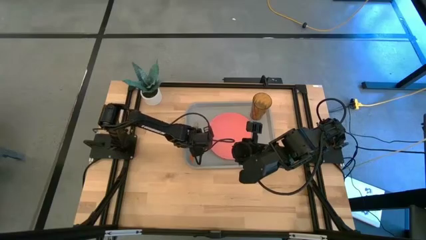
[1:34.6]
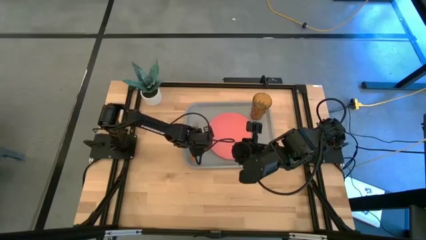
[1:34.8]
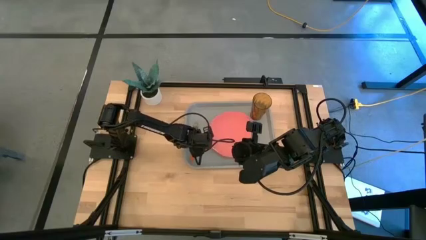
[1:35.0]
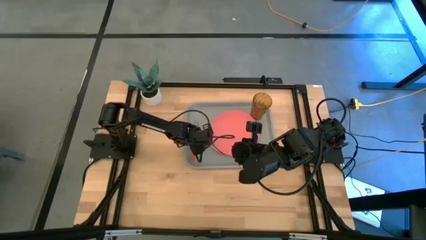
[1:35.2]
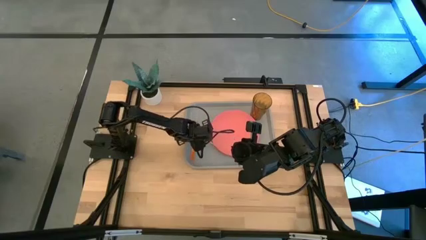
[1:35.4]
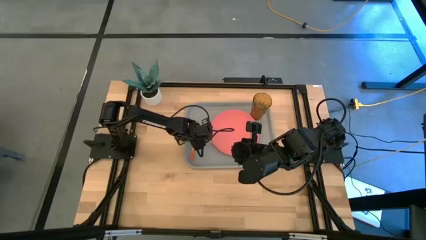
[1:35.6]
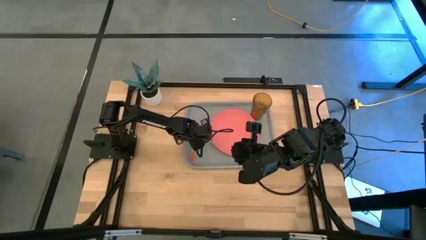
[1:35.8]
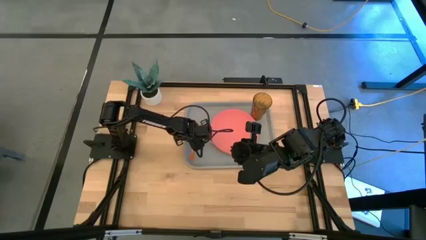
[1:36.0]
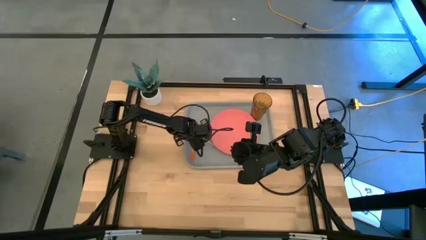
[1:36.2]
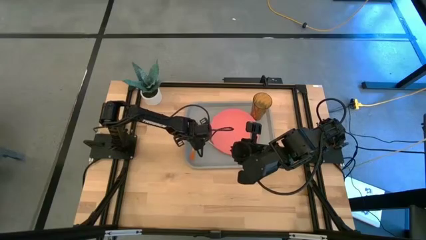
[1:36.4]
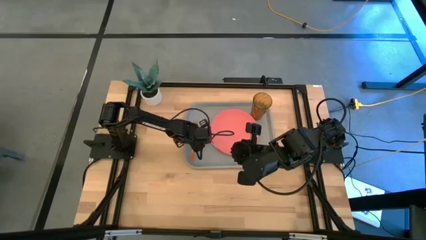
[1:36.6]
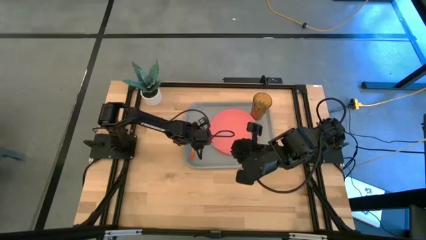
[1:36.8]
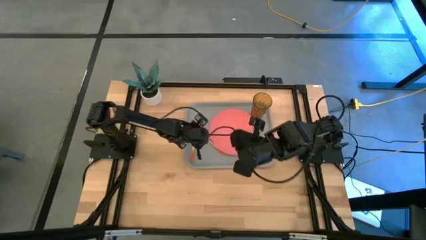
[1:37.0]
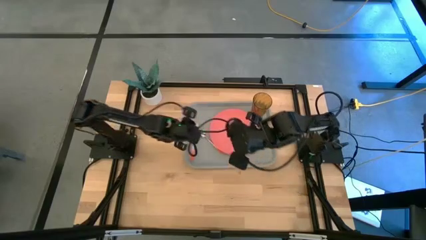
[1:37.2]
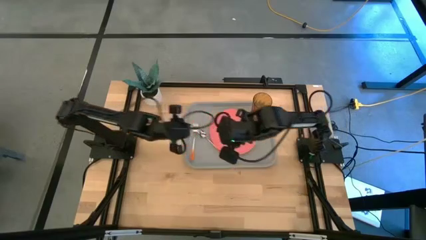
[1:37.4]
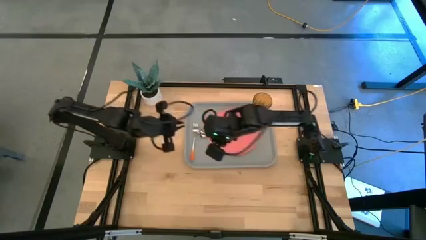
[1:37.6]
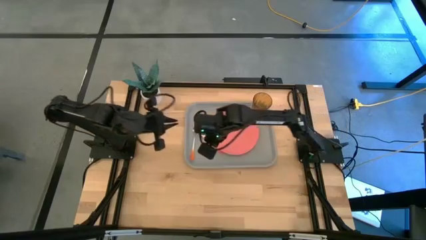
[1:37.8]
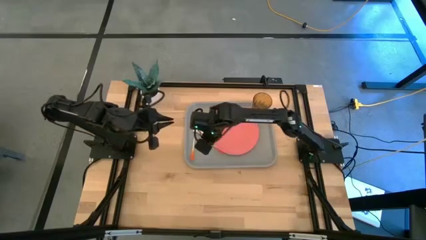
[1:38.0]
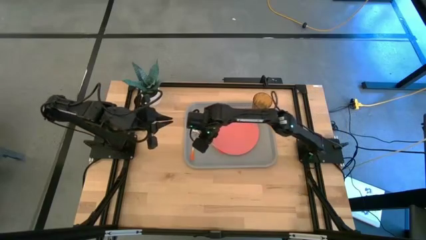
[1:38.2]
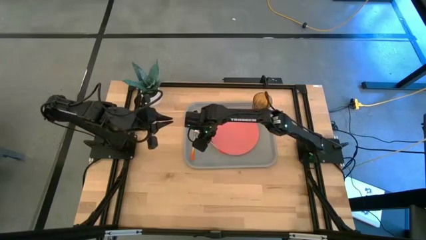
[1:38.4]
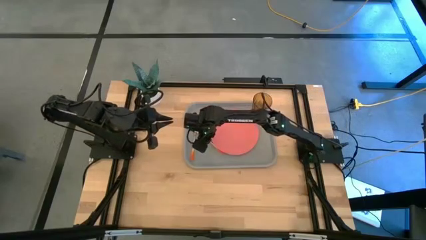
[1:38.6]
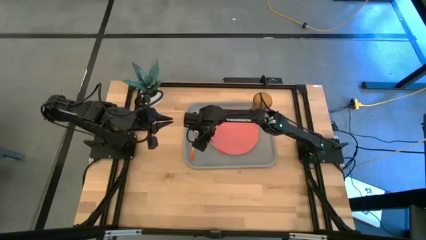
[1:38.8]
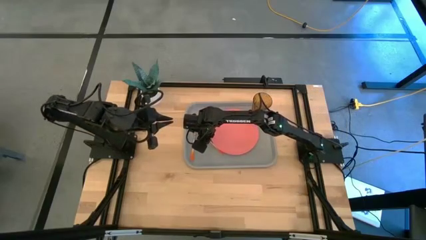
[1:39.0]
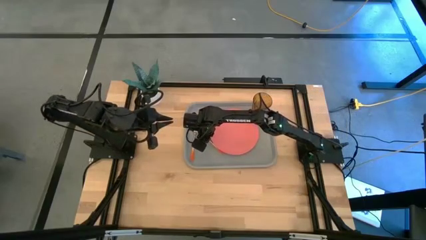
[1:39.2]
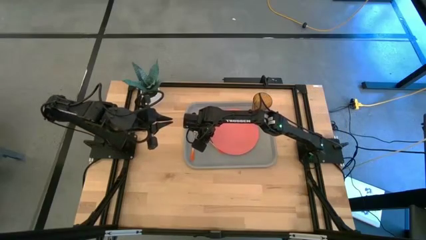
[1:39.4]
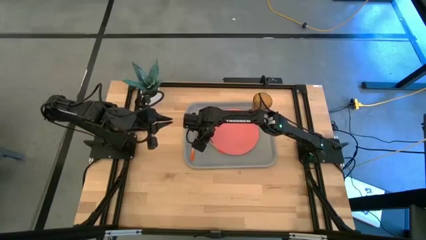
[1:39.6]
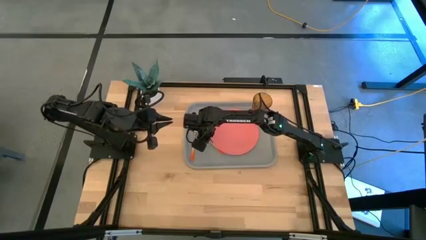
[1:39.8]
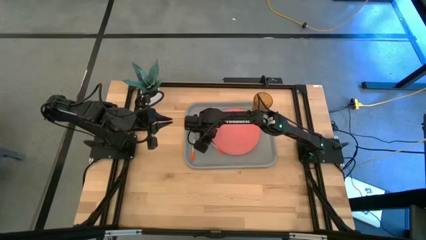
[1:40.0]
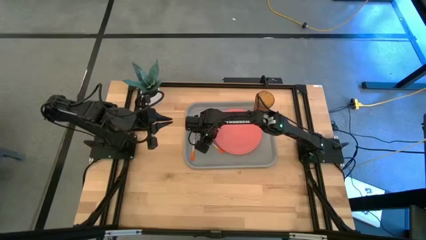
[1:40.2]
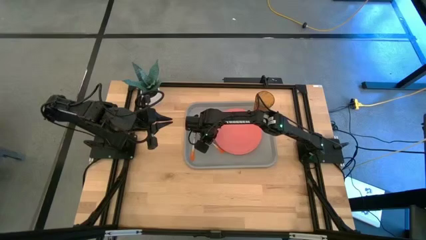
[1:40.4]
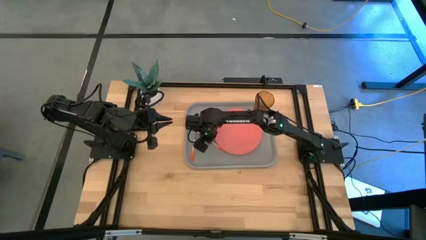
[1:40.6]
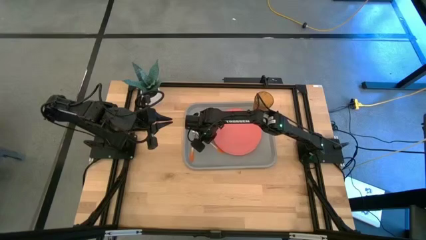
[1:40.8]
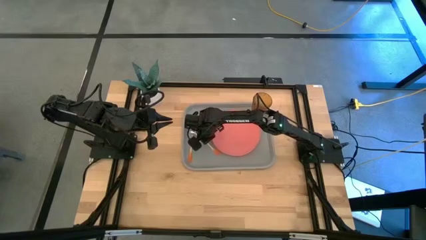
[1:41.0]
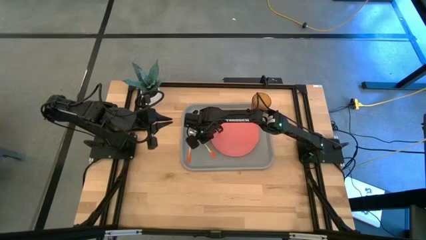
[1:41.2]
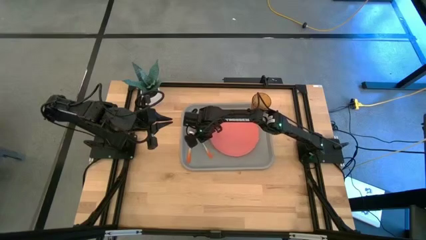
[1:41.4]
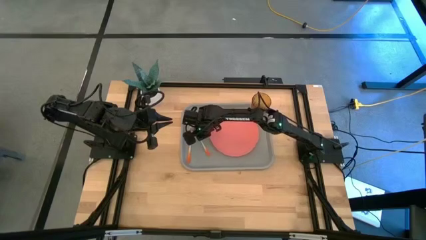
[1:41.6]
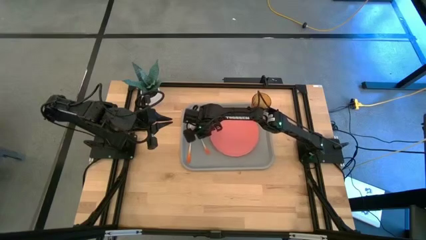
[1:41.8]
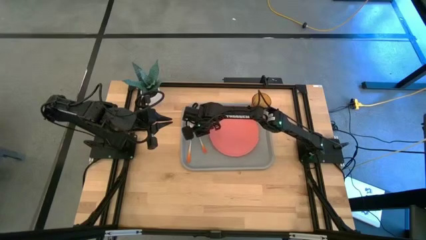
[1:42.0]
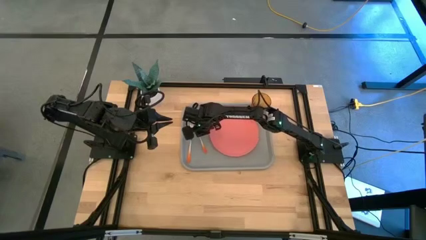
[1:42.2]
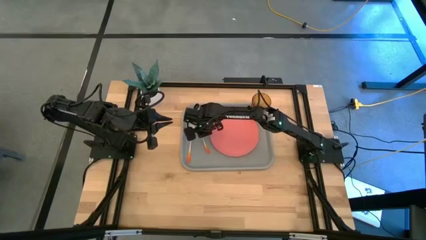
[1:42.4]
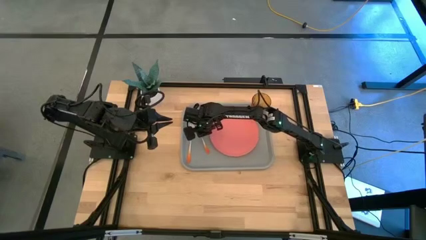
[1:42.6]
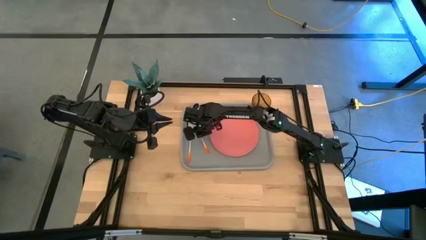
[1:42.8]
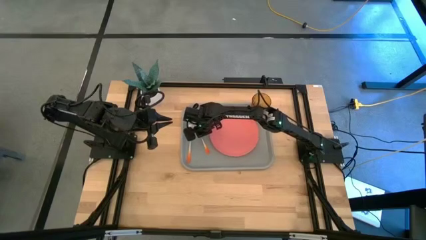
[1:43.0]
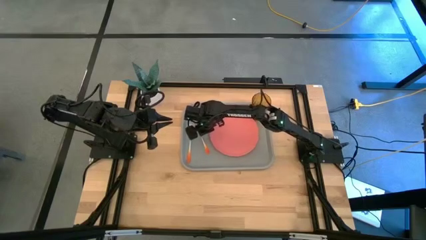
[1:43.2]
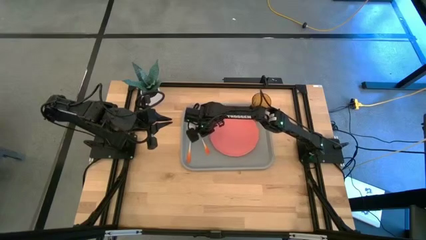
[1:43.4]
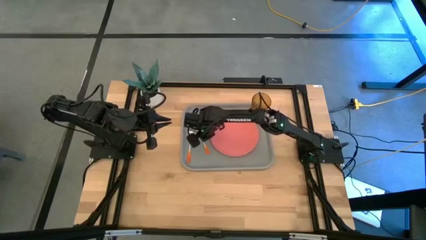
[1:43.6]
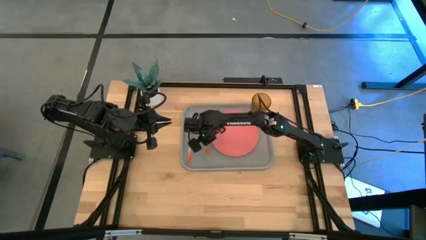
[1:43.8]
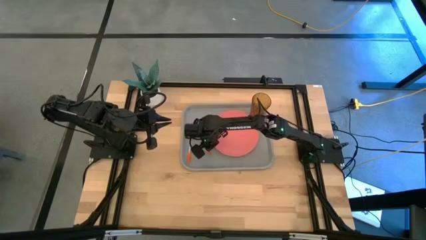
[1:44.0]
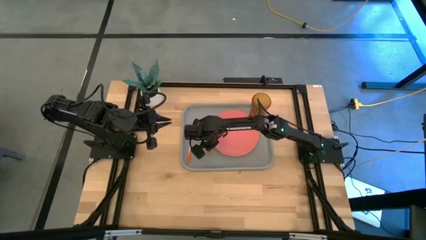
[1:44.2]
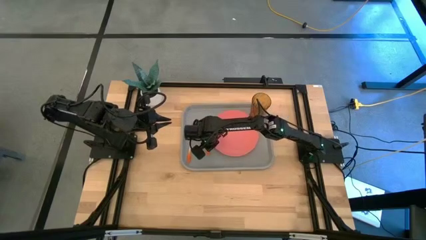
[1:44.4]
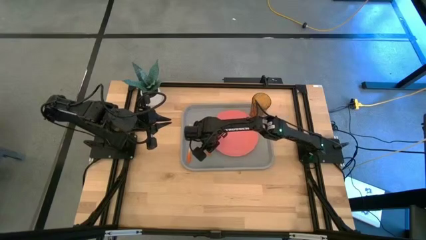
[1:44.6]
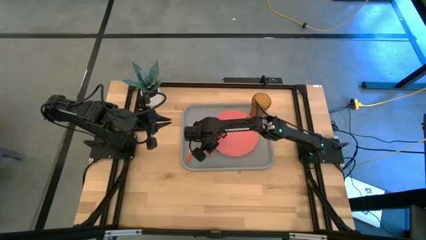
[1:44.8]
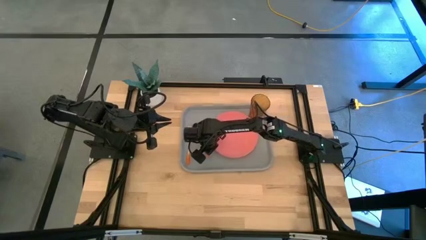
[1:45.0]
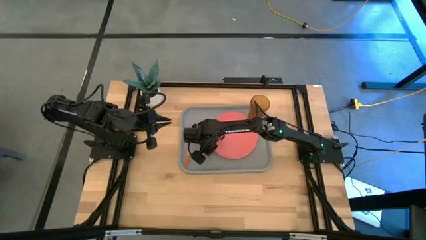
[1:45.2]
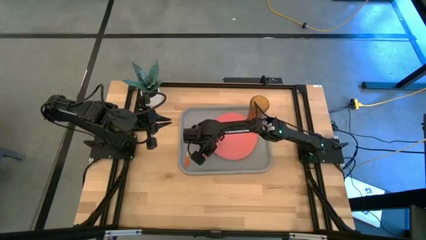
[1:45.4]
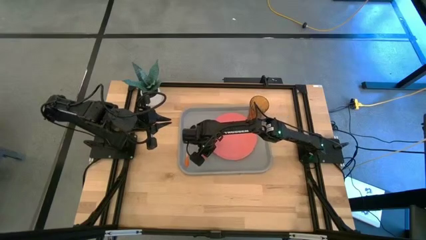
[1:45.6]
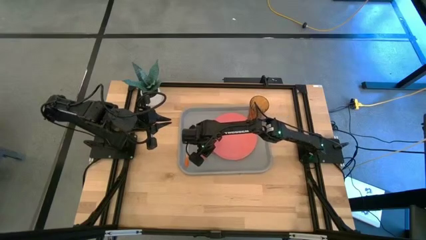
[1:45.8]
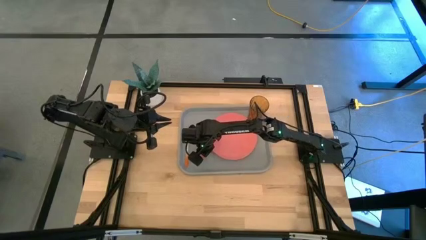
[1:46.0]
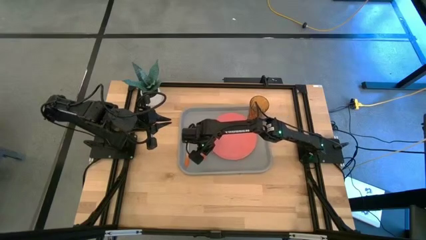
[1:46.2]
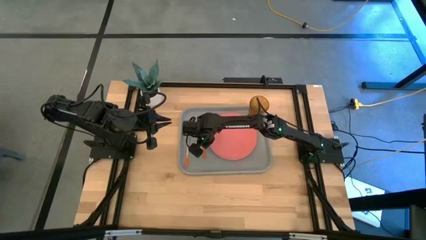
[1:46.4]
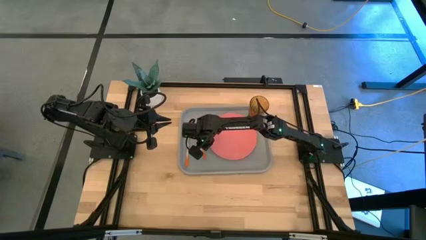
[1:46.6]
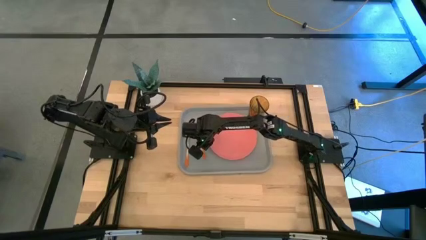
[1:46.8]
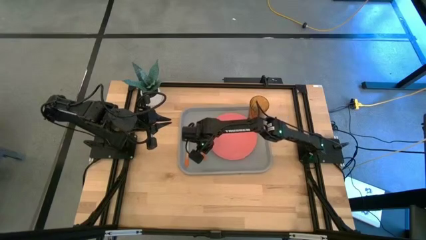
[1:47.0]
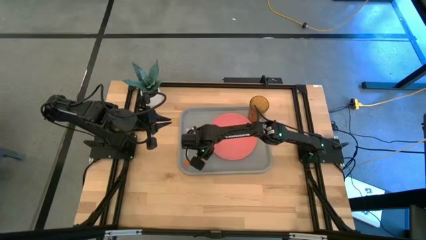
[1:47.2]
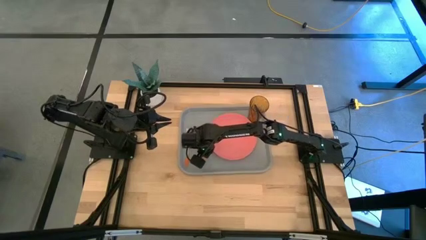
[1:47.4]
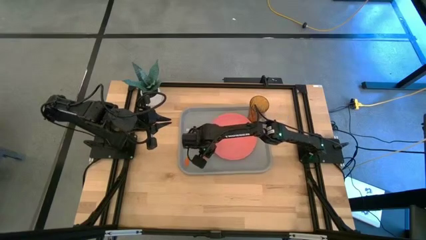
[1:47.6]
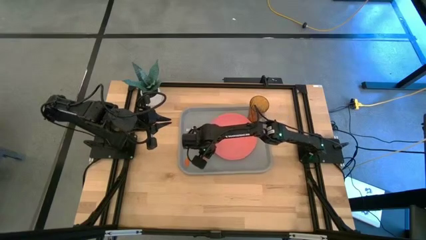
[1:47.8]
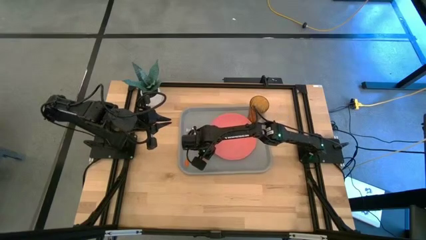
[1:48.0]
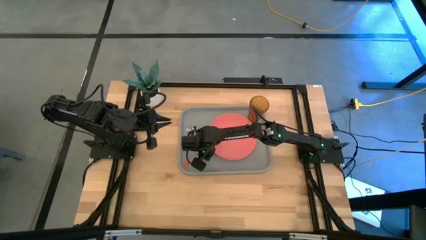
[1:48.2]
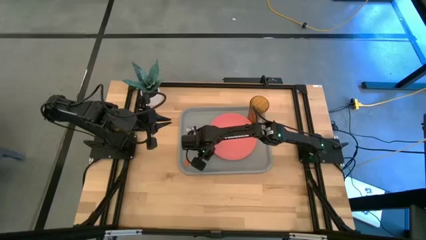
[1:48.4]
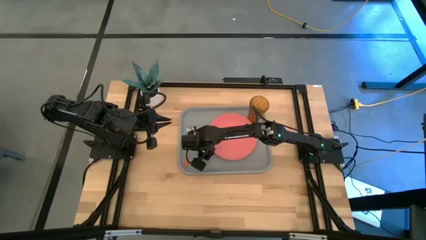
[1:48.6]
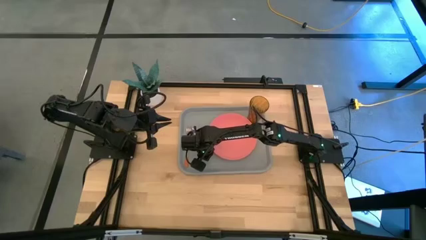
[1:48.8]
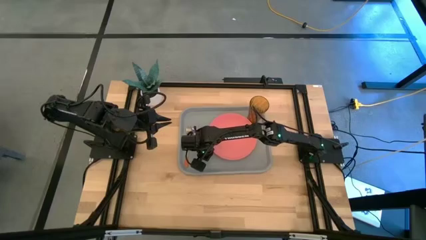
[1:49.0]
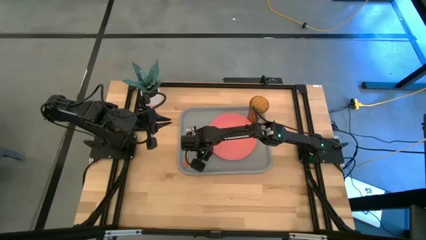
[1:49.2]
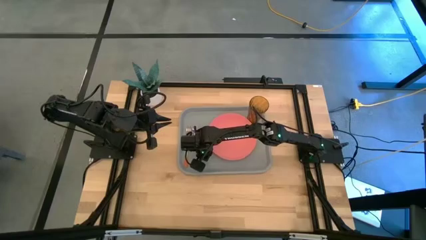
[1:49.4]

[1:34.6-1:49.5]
Task: Pick and place plate/cup/fork/spoon on tray
Put the orange spoon on the right side of the orange fork on the gray serving tray
